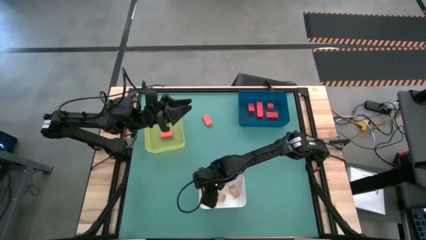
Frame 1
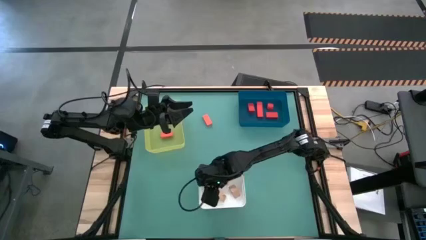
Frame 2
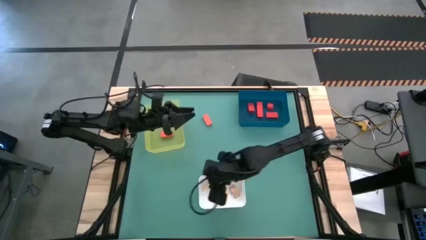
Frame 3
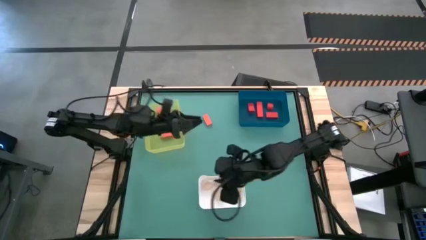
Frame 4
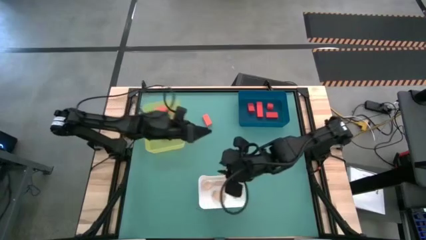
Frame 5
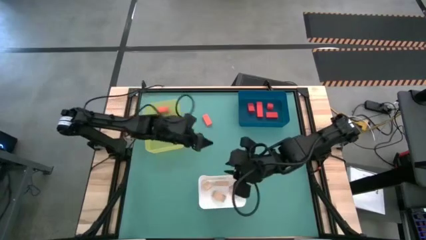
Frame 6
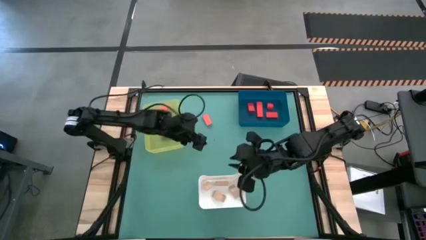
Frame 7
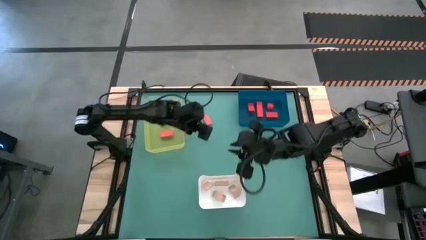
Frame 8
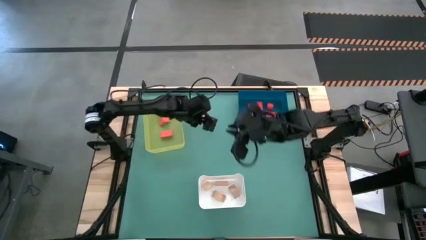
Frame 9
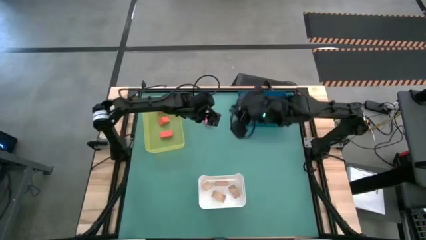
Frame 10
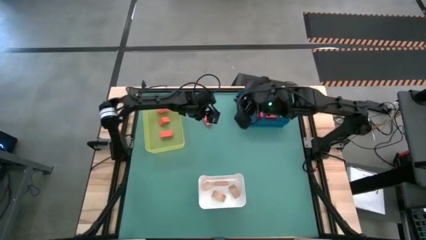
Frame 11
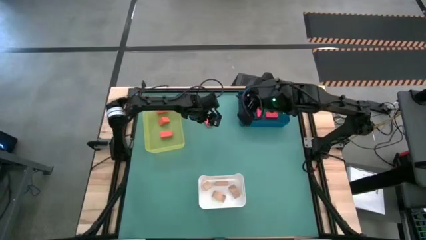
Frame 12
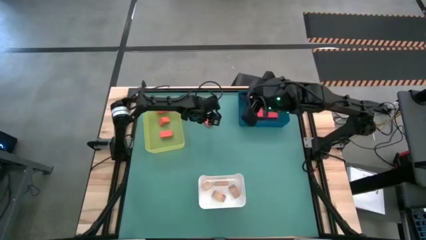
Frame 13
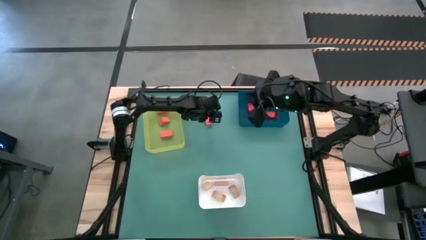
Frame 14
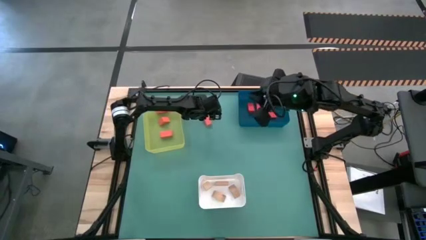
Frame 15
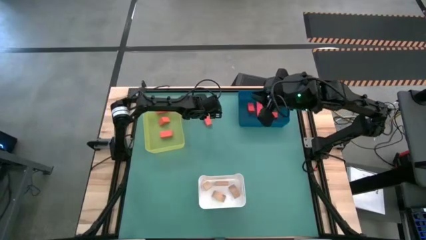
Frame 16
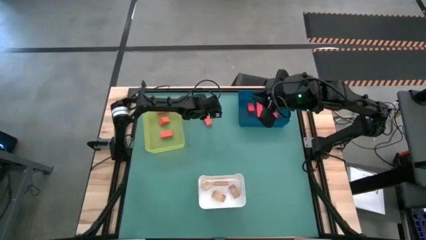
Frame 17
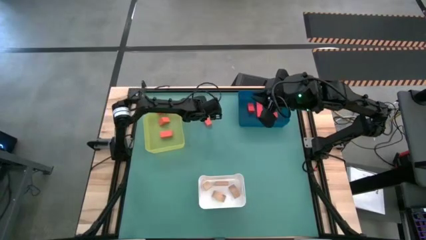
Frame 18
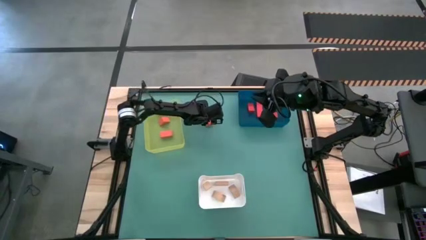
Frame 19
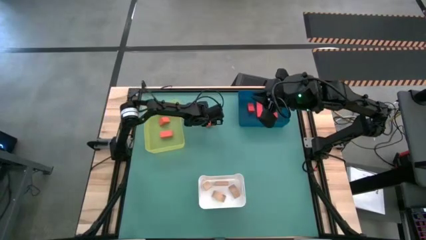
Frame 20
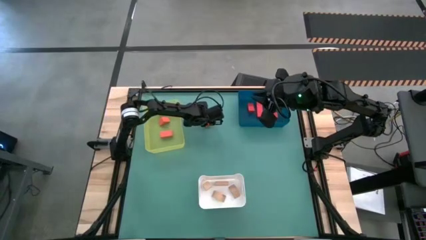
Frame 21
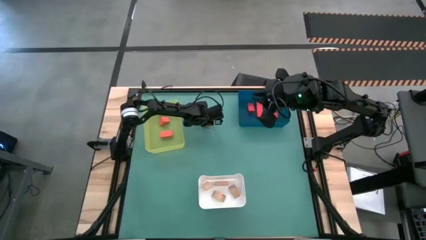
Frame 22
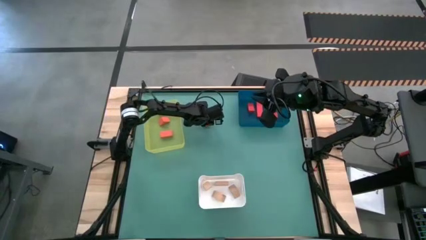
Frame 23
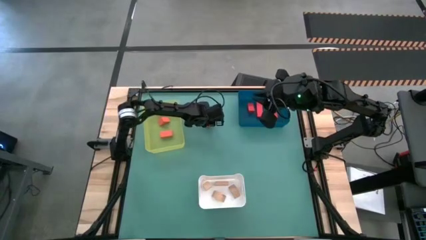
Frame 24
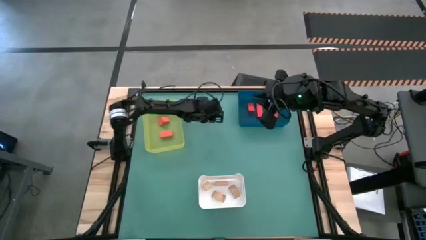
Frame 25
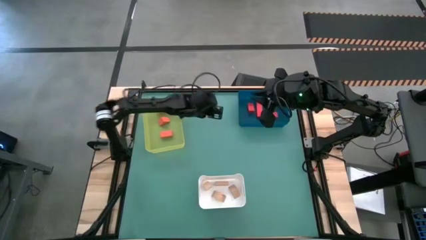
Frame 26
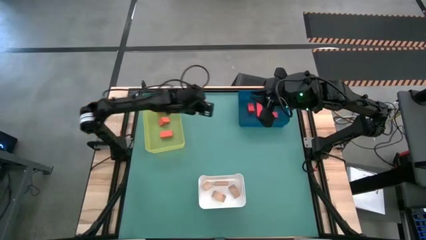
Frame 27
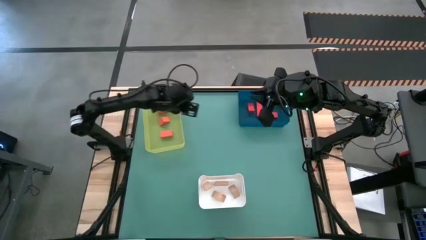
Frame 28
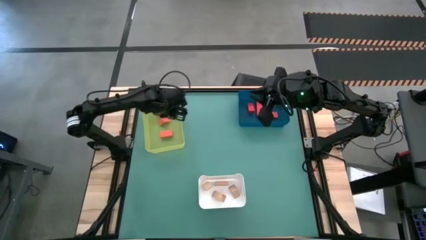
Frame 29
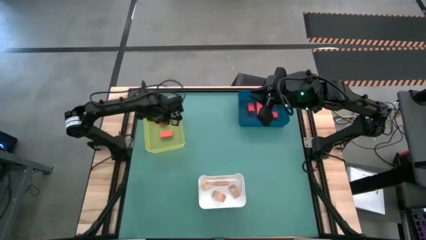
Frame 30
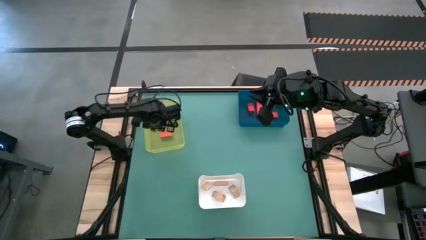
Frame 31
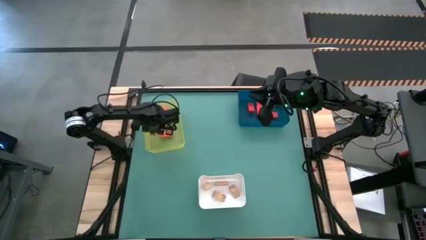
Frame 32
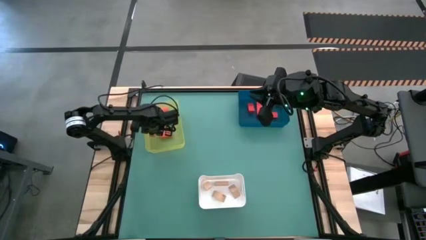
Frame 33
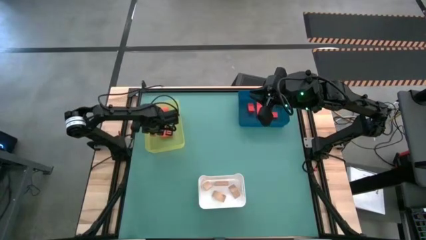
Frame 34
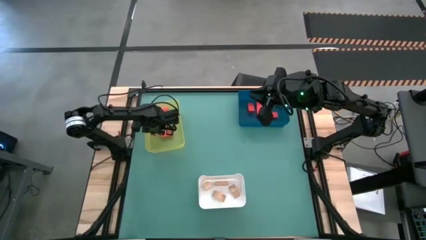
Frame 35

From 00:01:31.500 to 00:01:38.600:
Task: Sort & place blocks by color
Put the orange block into the yellow bin

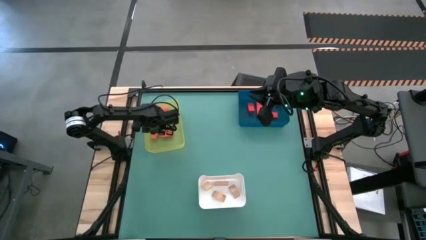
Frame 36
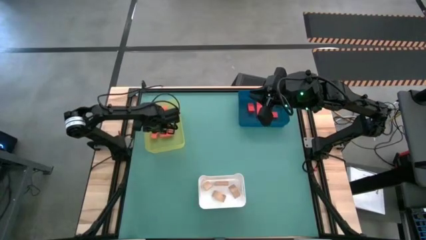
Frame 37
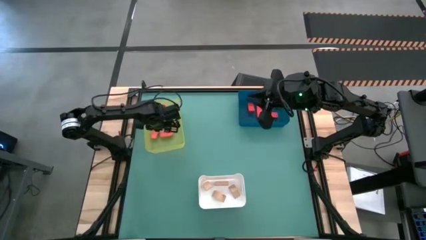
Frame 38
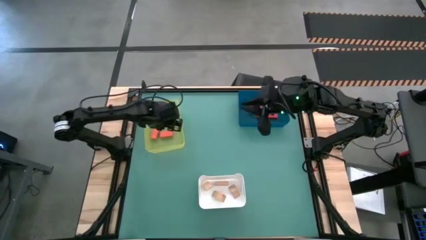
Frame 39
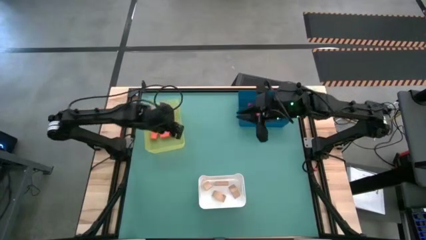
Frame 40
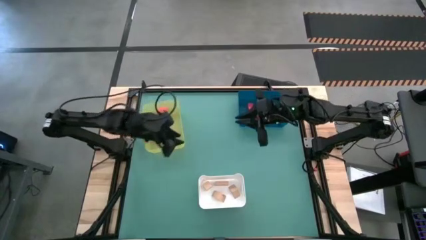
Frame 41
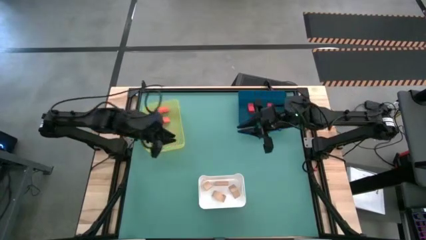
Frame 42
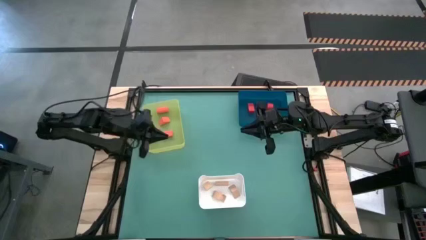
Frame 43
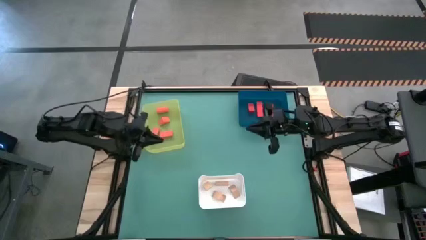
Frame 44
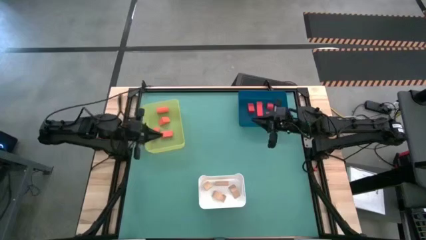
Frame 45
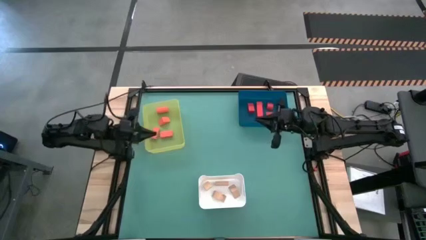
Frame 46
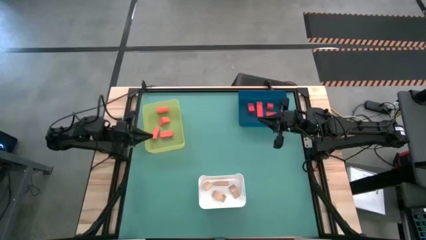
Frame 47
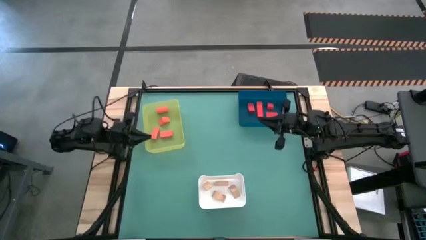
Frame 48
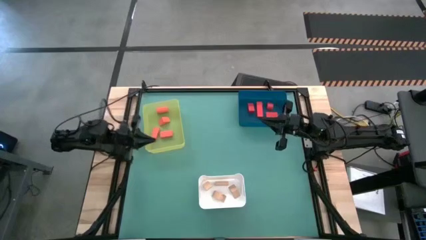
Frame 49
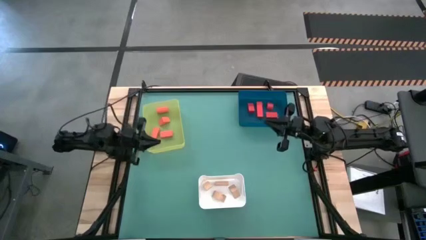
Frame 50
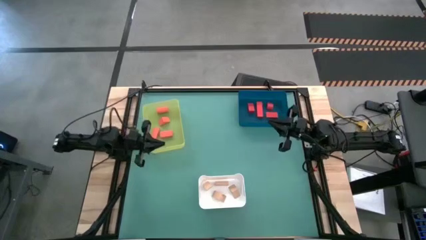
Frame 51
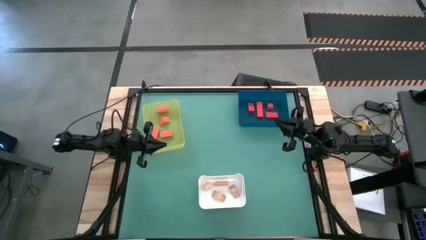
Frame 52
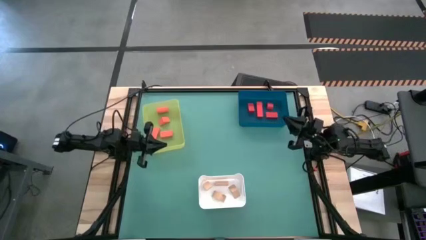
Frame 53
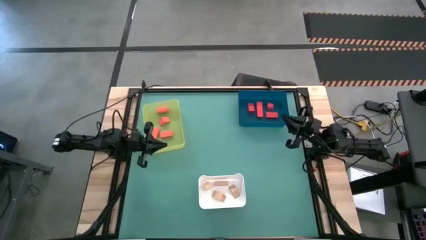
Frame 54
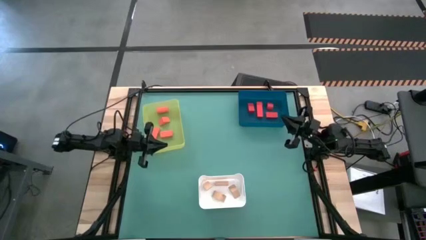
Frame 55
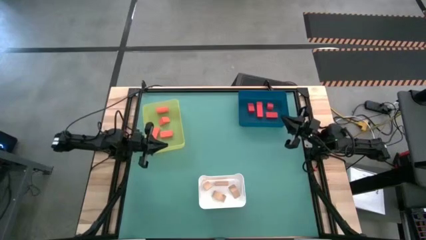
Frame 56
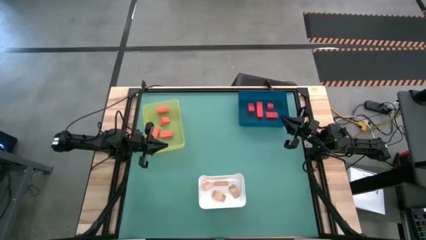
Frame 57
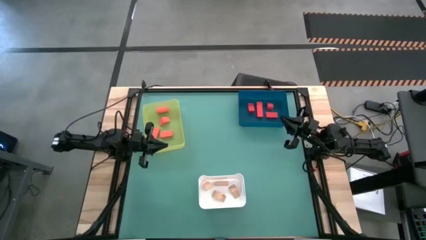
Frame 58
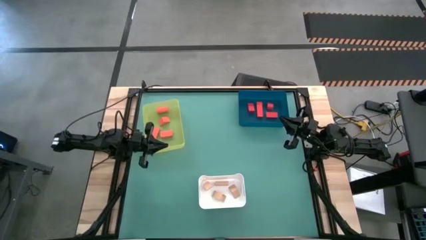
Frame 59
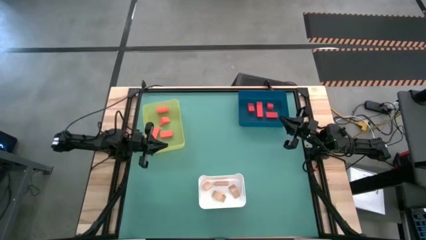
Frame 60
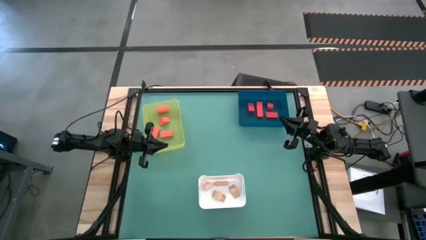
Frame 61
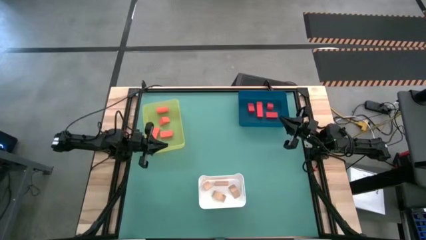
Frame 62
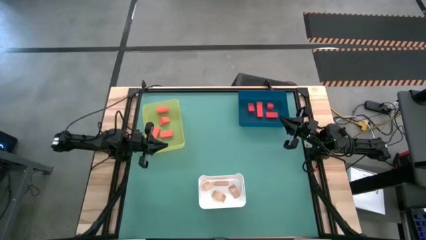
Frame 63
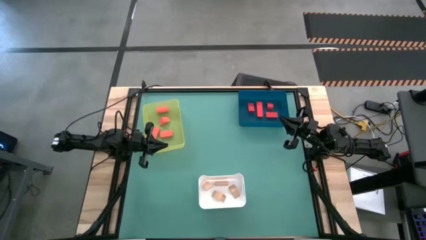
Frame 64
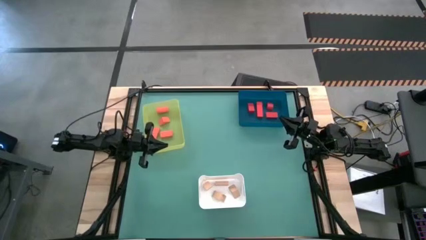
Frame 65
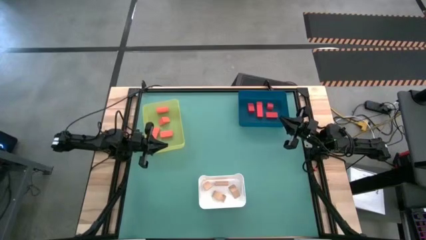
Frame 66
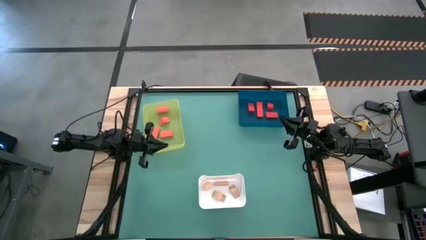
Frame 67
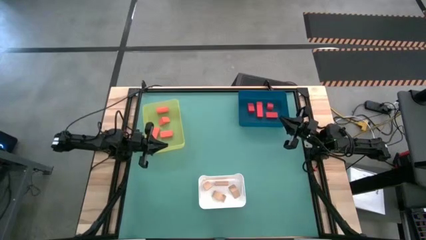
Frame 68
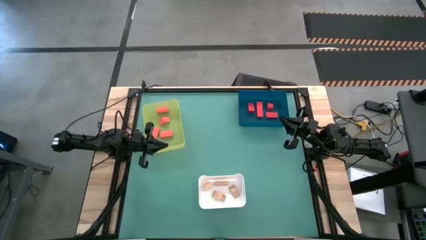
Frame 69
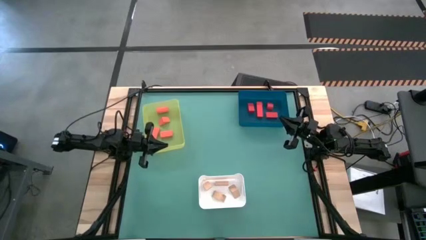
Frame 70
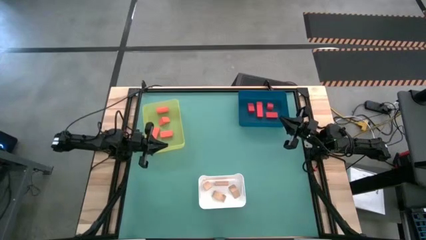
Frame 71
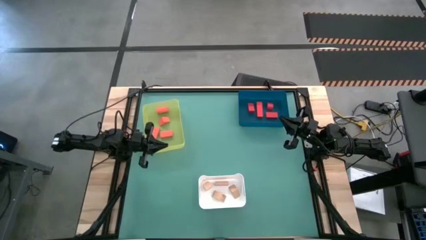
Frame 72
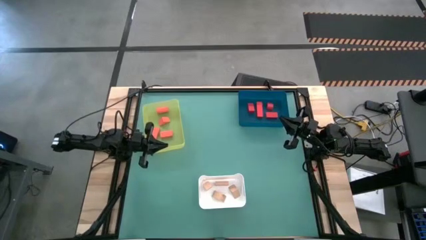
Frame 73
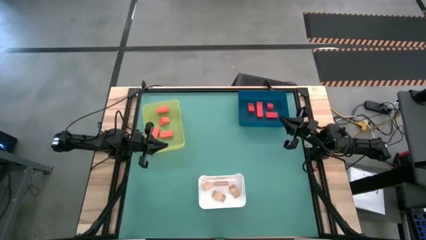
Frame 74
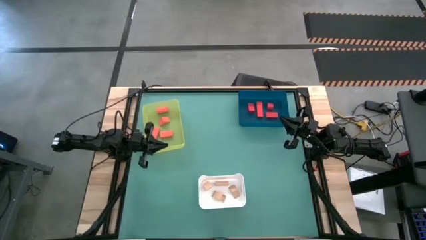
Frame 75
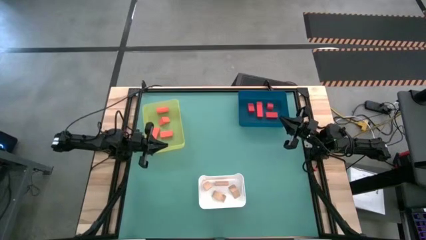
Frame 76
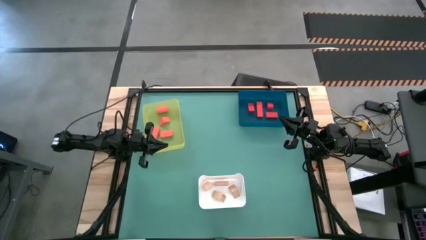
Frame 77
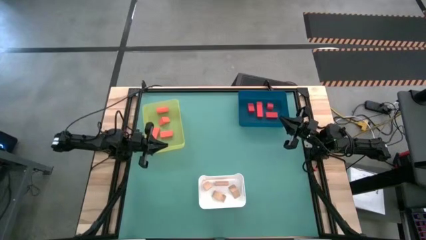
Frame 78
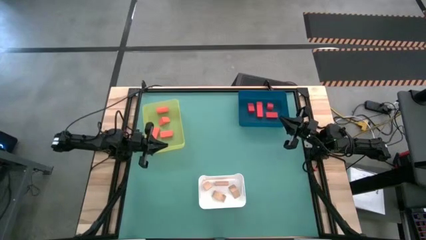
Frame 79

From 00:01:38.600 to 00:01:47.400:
Return to Home Position

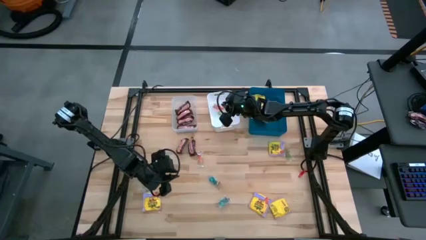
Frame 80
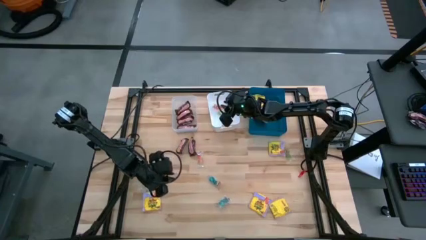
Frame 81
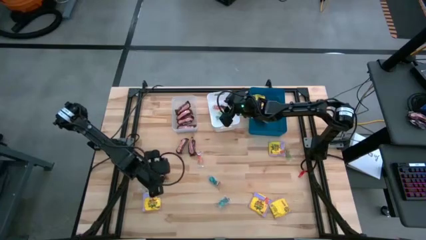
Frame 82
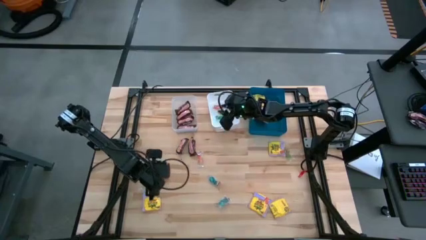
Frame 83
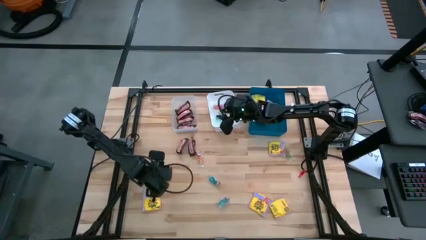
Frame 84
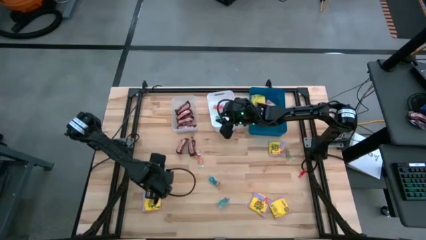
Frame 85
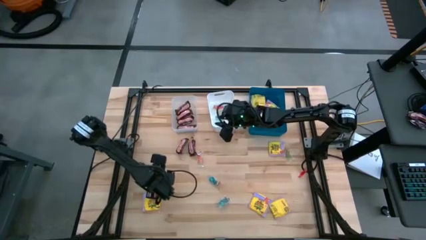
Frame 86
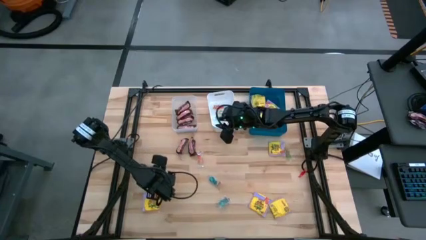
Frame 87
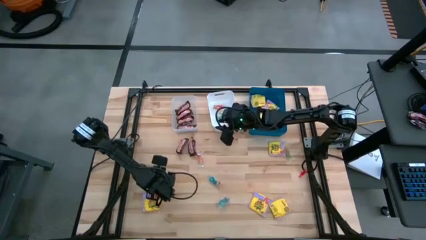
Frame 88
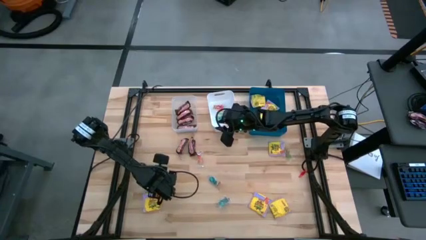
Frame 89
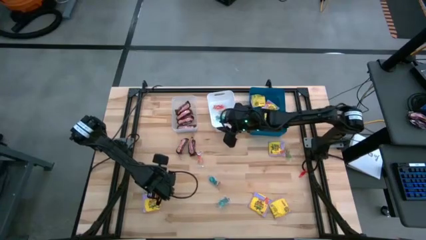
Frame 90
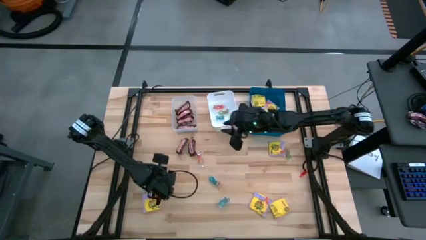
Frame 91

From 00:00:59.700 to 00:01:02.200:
Task: Sort candy
Put the middle left brown candy bar into the transparent bin
